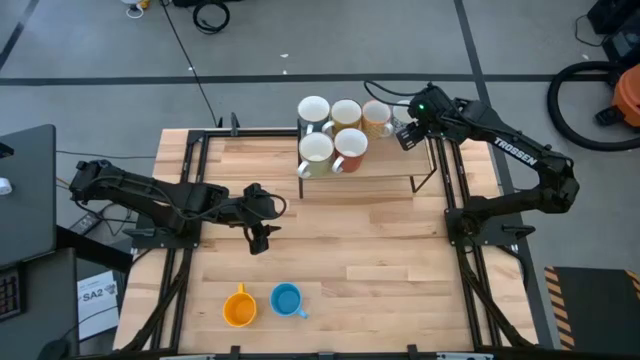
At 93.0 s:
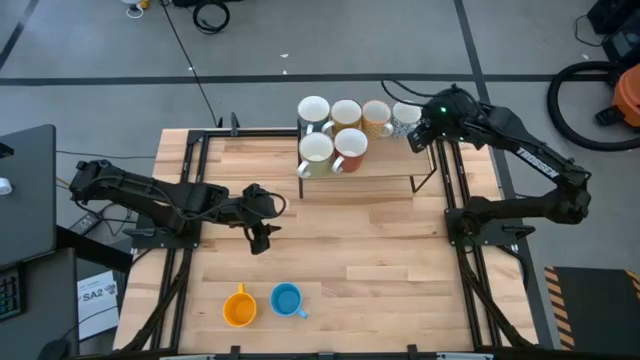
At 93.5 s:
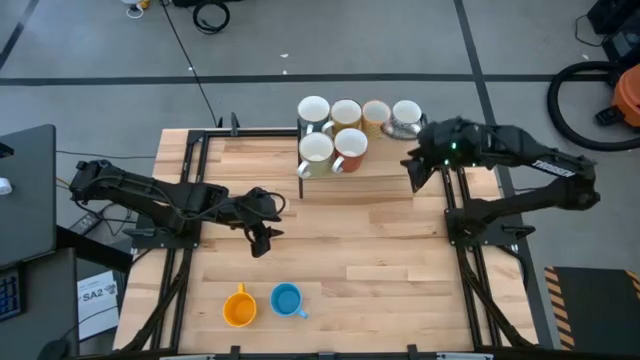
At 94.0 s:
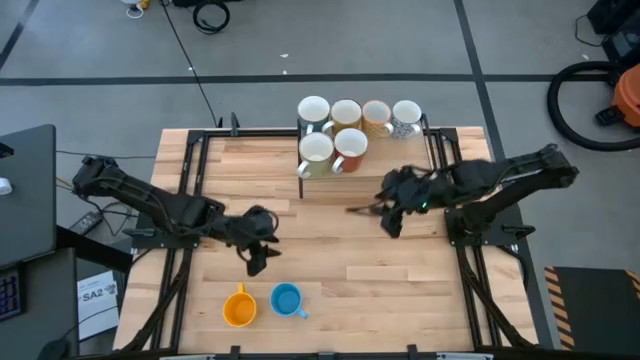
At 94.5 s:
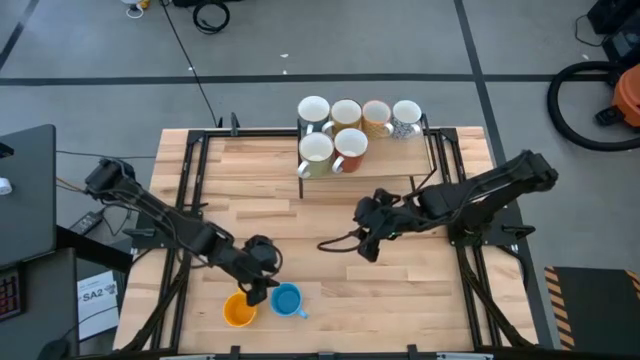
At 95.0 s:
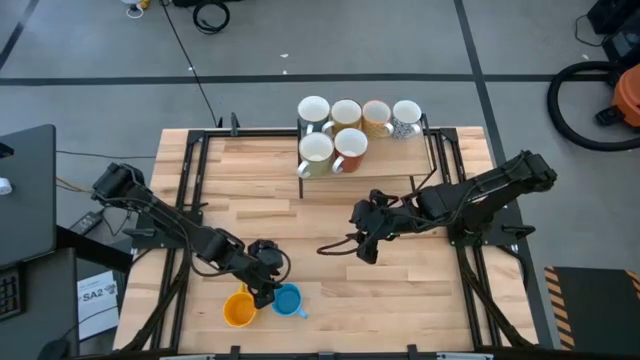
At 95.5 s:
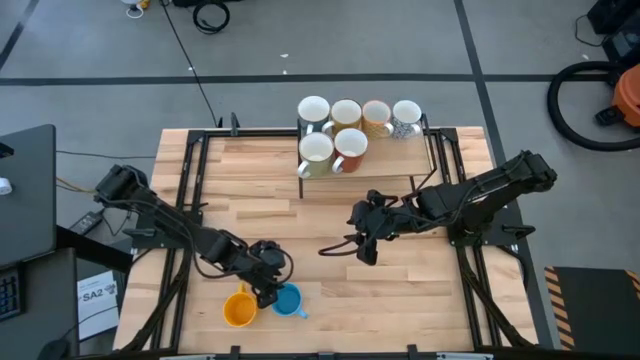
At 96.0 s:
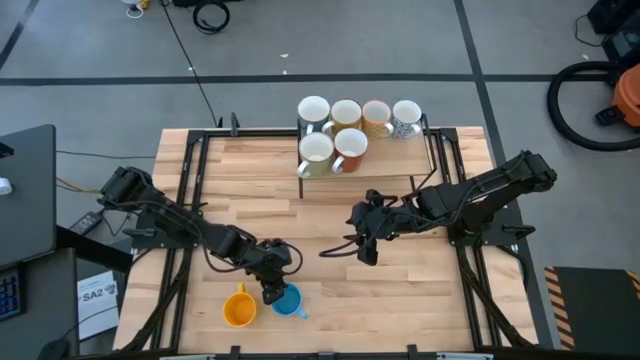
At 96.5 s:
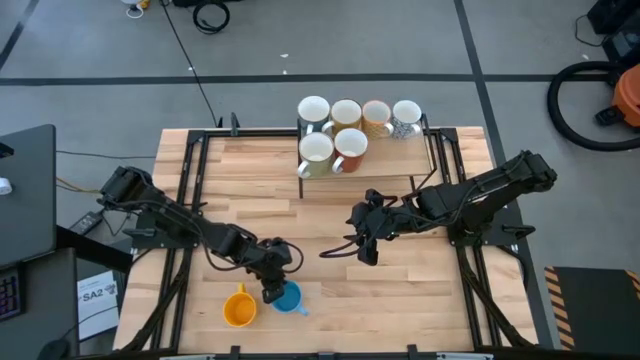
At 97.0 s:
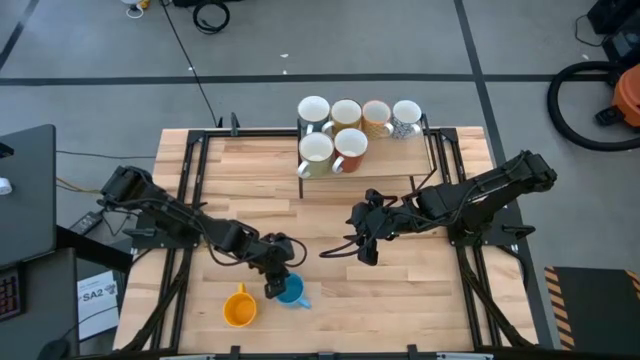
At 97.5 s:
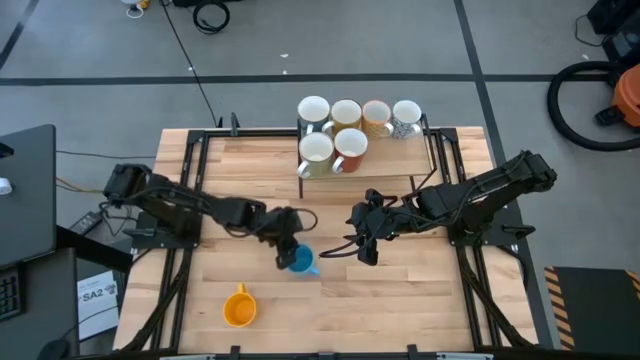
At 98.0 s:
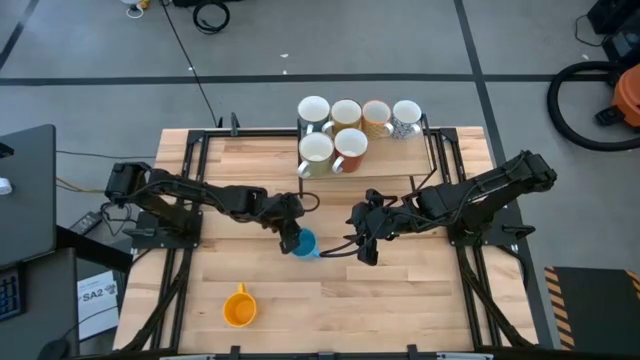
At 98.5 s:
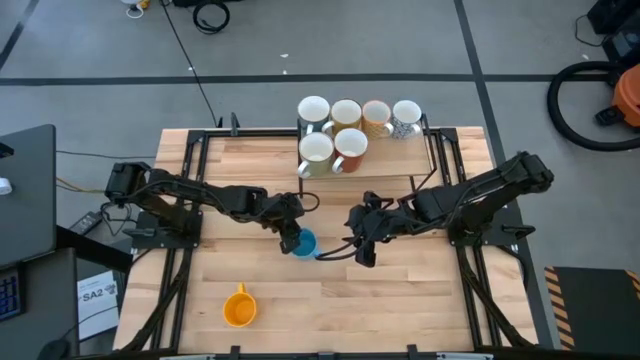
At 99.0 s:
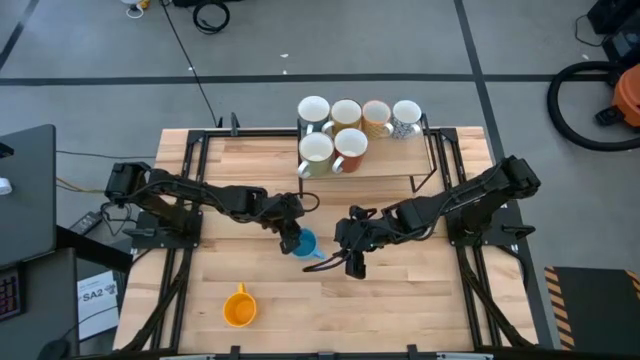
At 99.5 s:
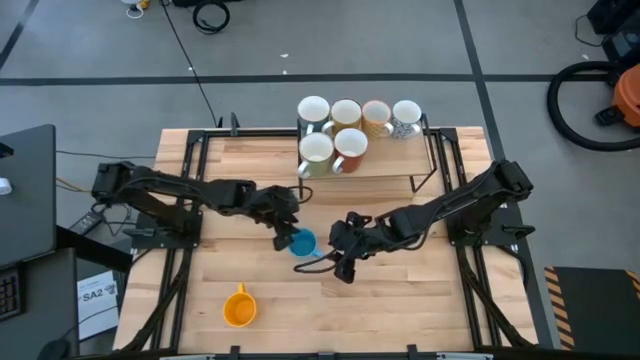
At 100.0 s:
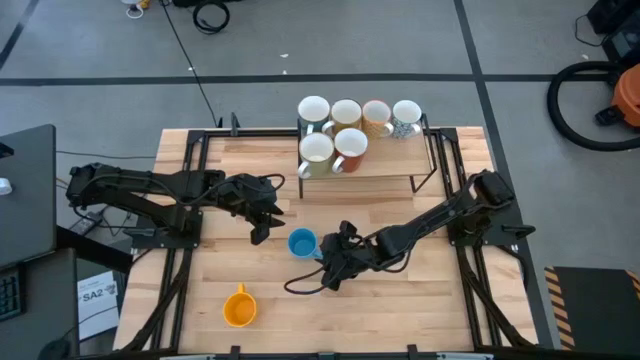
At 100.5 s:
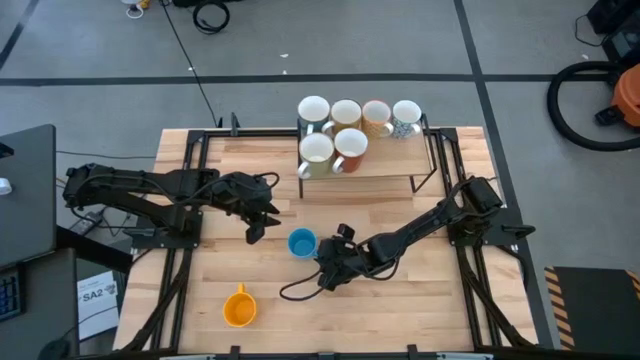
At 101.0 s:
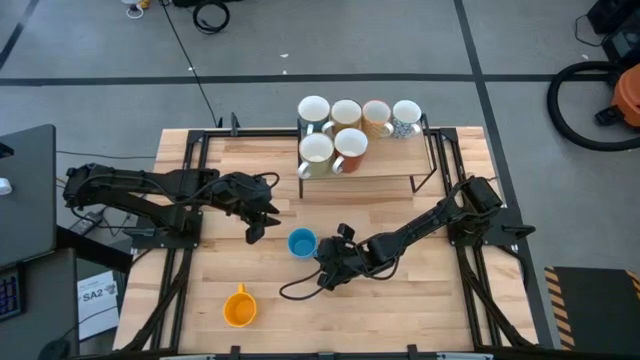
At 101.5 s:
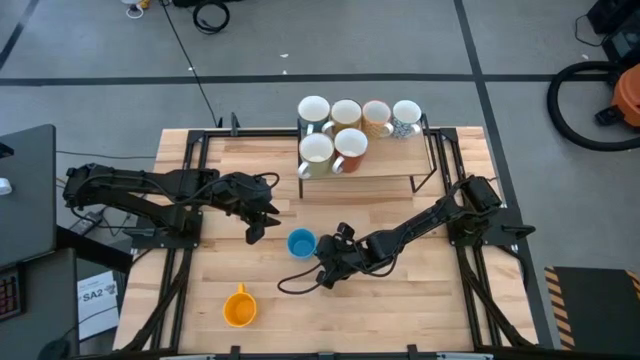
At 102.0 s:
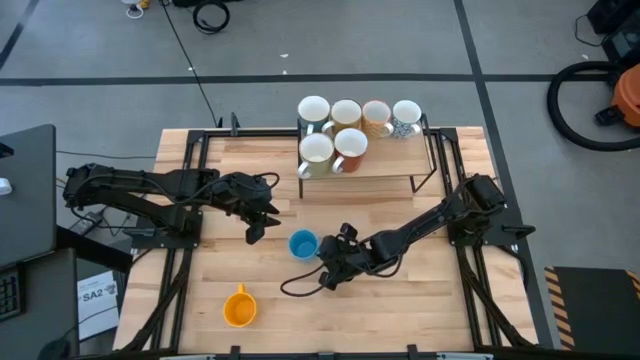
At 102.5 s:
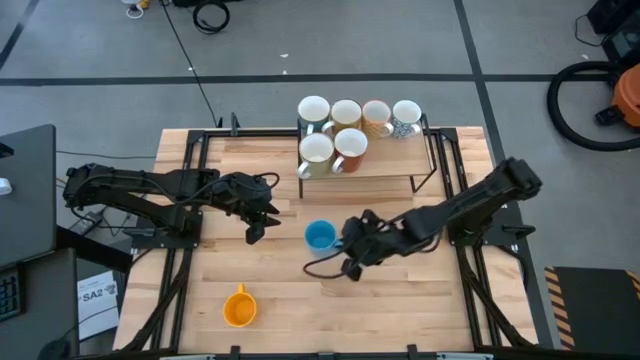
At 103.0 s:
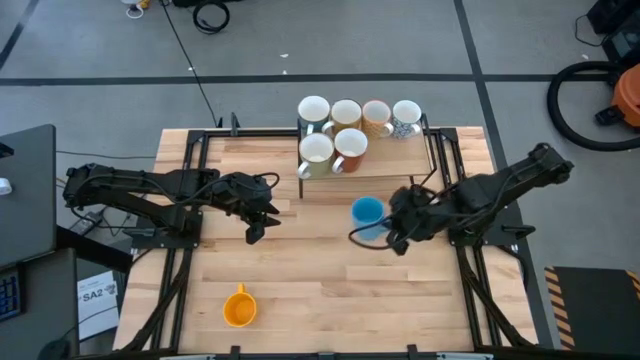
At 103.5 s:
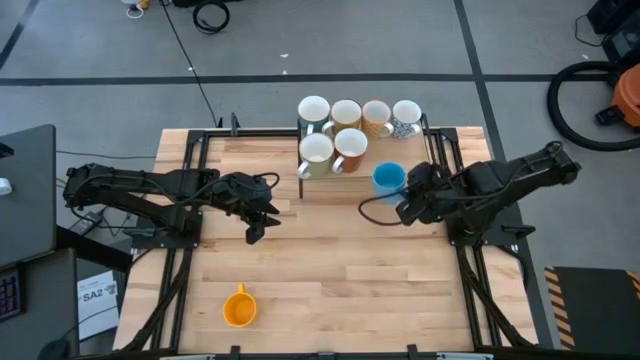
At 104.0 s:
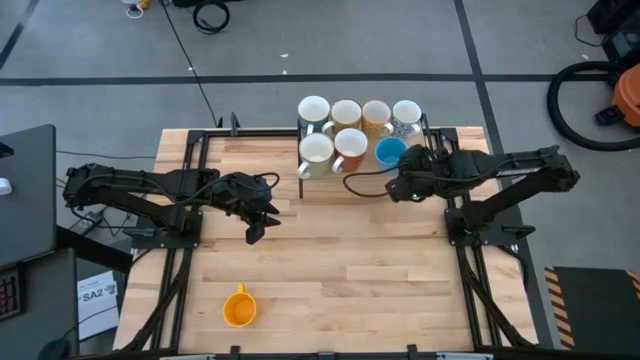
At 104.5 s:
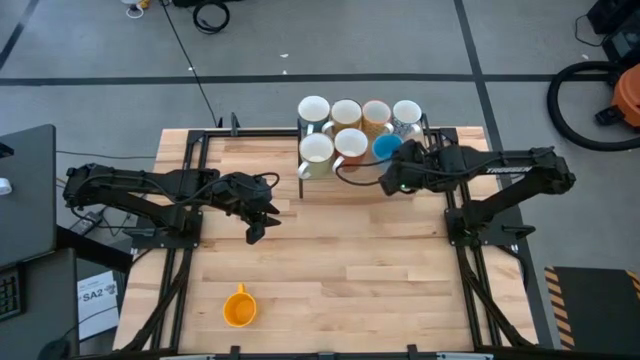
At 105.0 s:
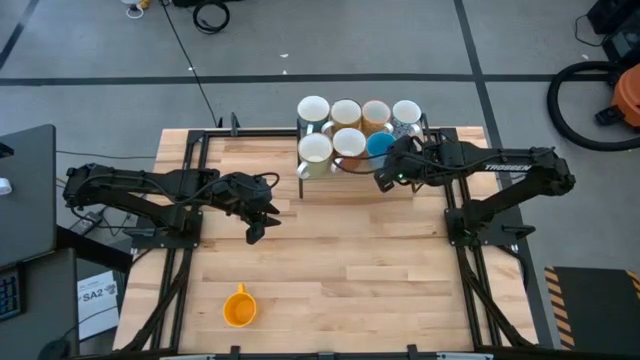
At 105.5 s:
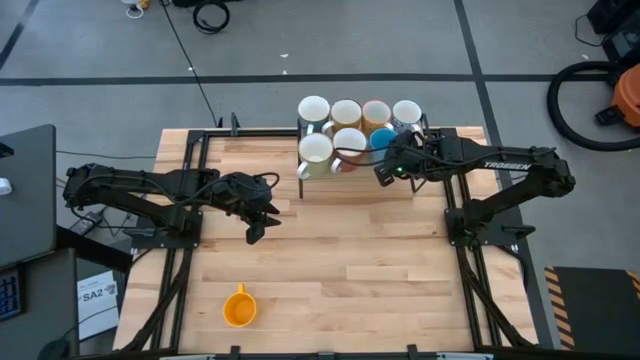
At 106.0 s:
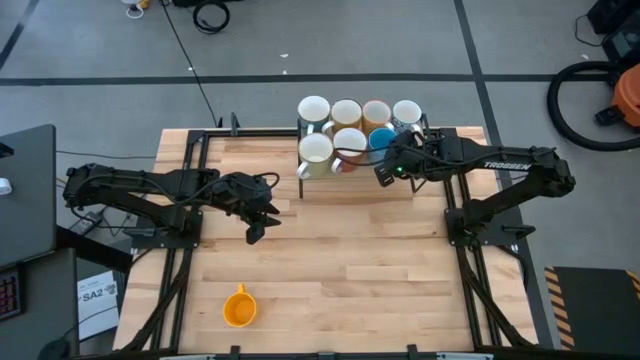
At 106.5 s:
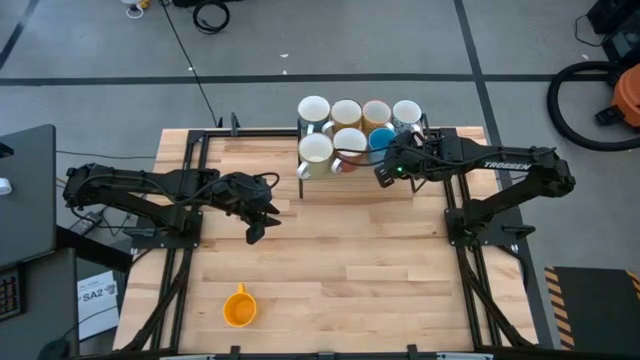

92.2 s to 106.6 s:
Task: Place coffee mugs
Put the blue mug on the shelf

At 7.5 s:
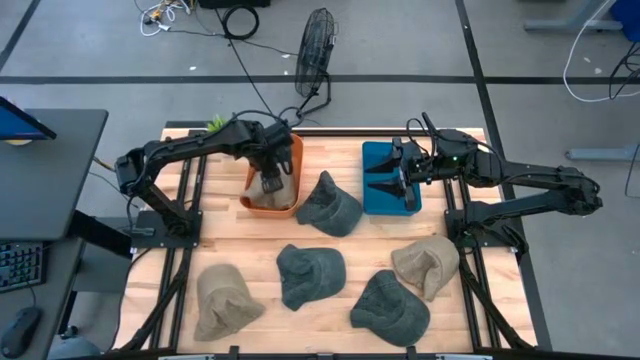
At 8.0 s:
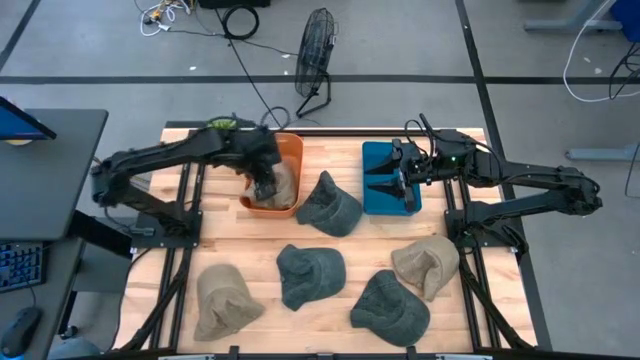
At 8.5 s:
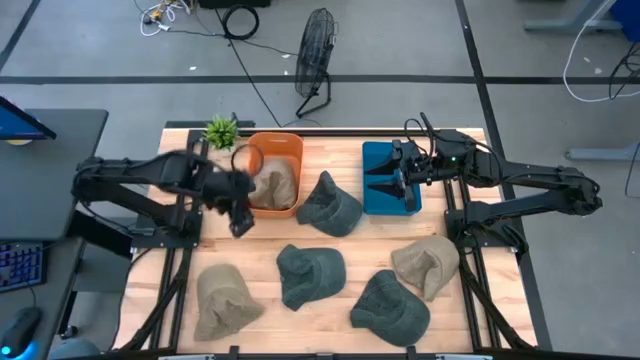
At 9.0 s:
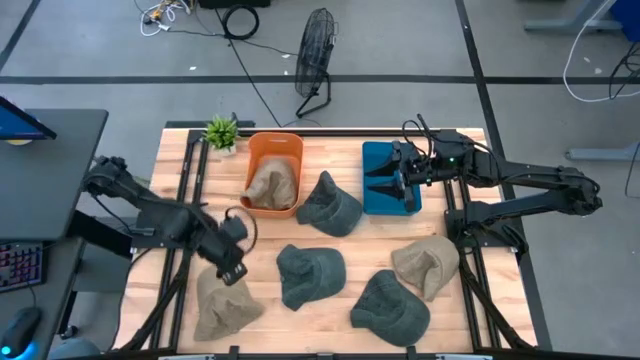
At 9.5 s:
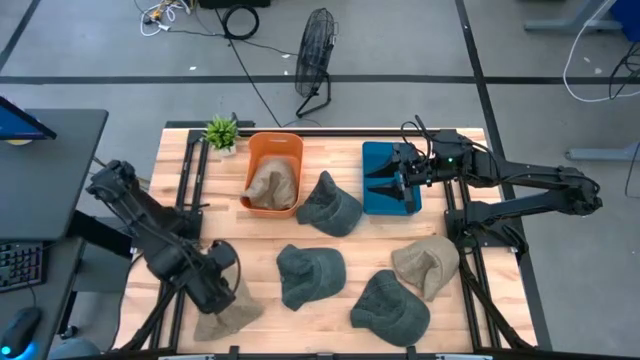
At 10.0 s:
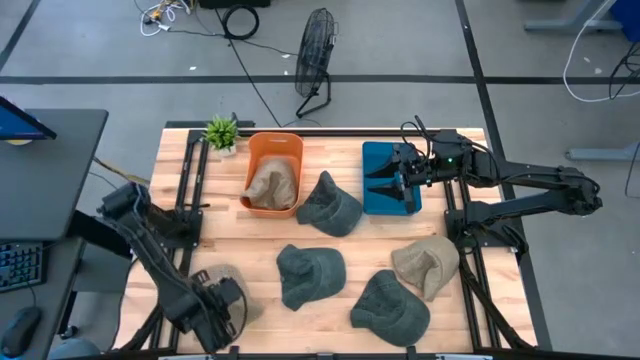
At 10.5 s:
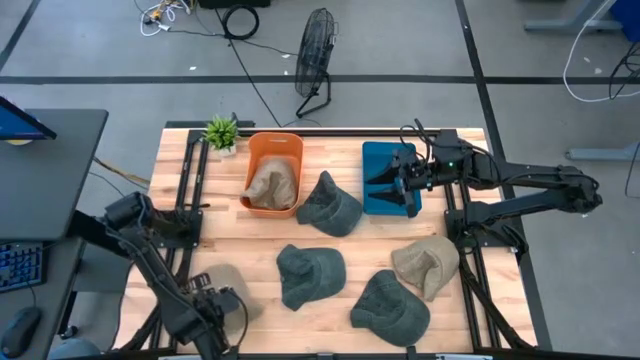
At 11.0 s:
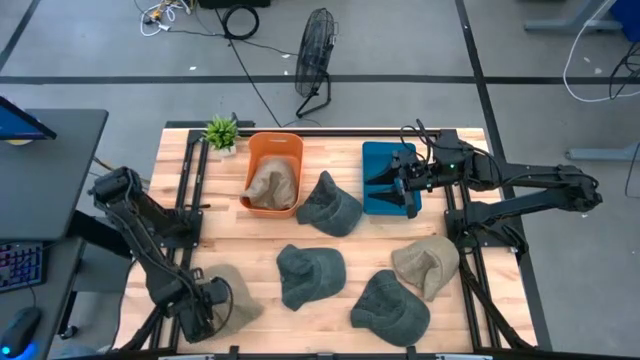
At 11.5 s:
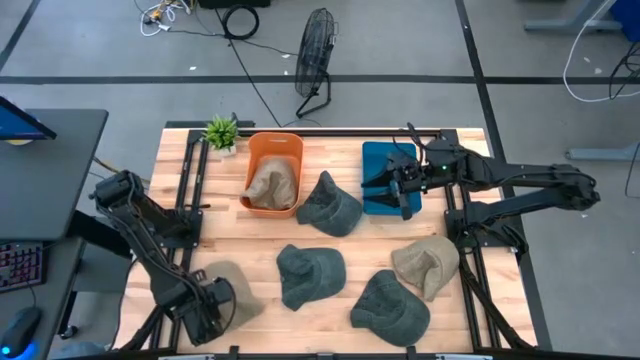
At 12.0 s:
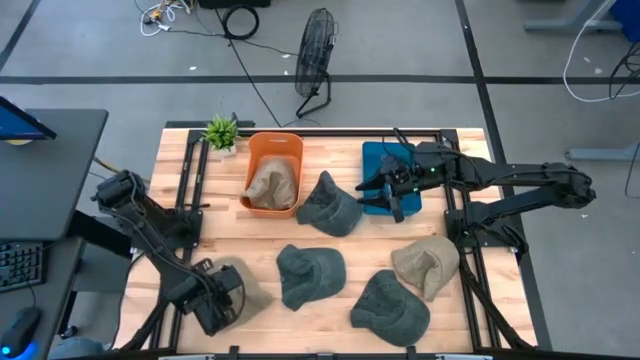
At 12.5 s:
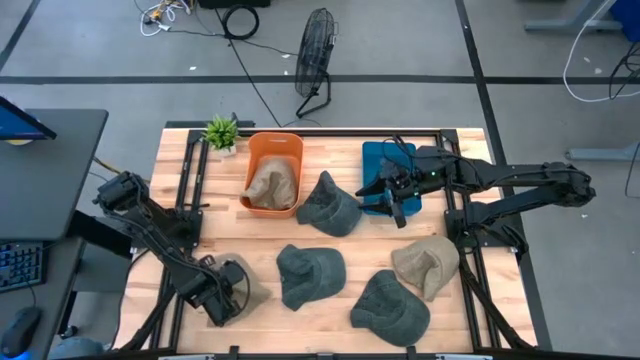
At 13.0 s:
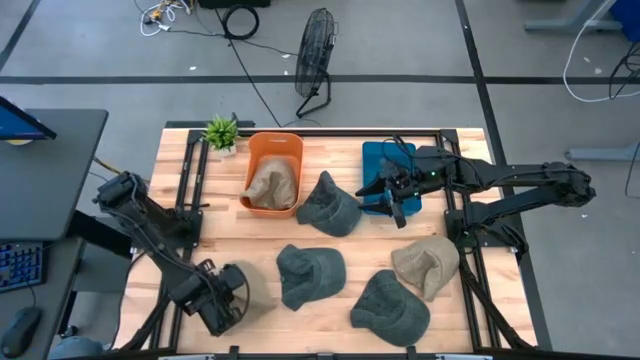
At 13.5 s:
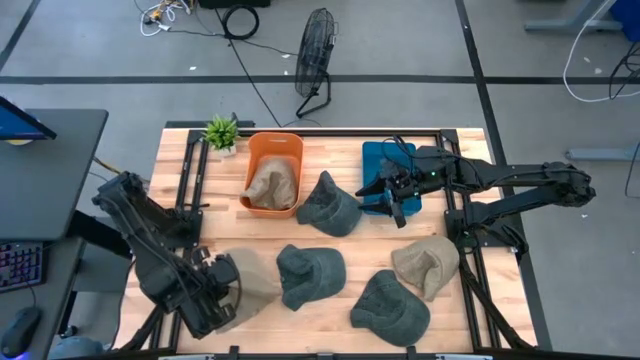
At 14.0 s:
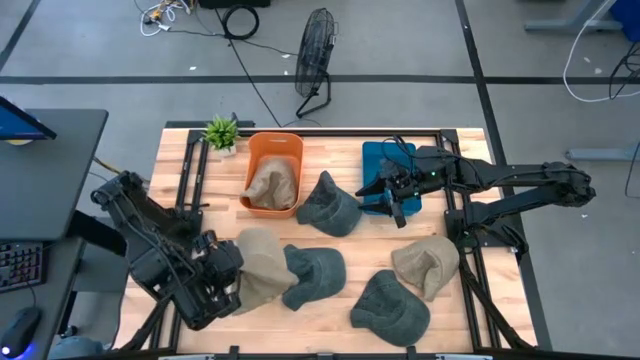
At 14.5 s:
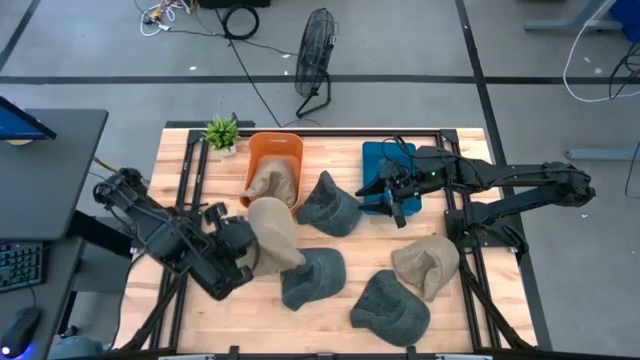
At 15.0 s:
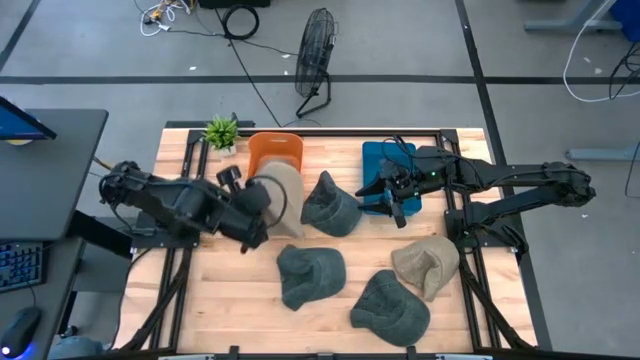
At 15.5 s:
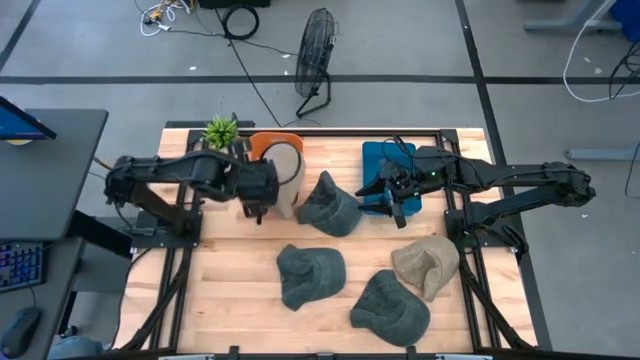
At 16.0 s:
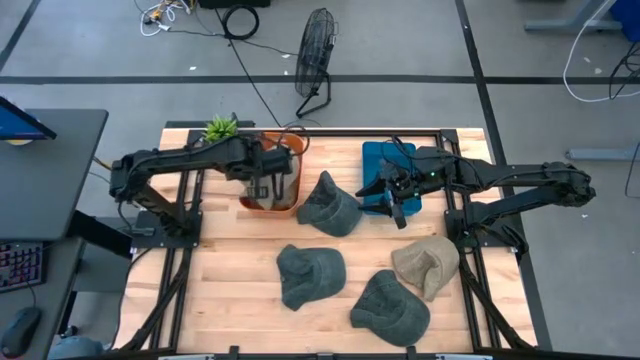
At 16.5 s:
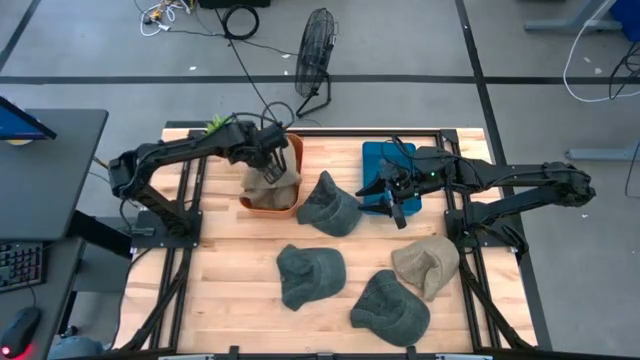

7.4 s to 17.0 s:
Task: Pick & Place hat
Put the left brown cap into the orange bin
